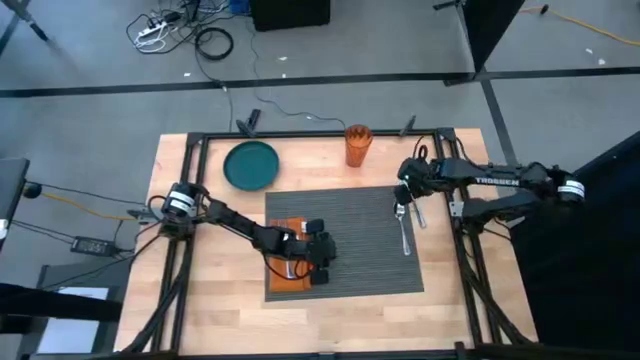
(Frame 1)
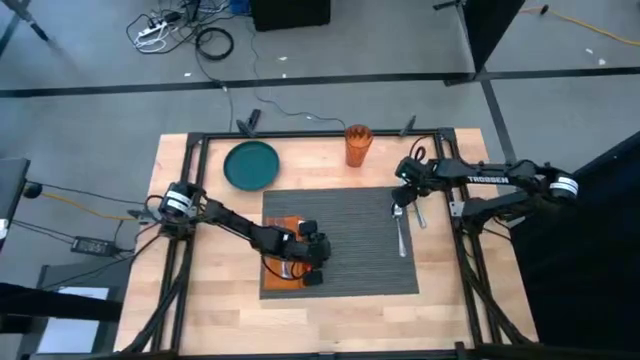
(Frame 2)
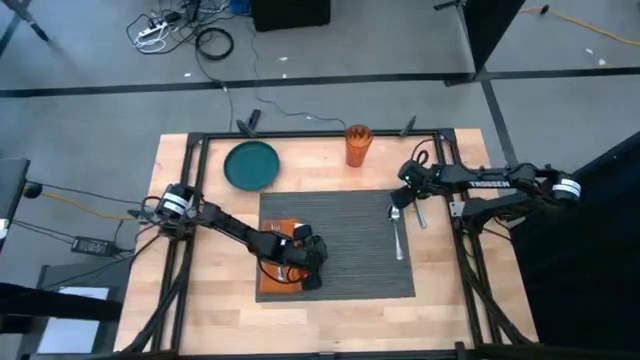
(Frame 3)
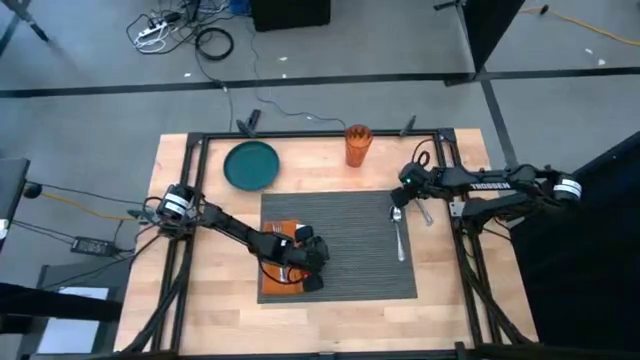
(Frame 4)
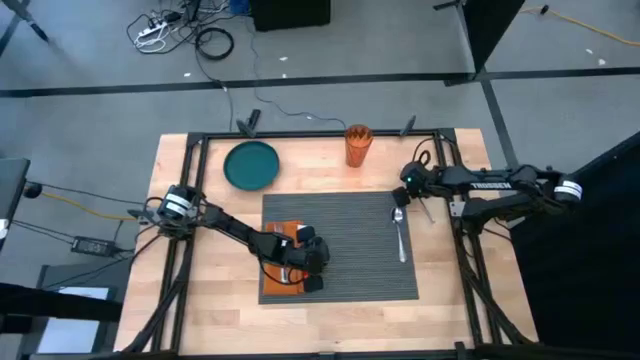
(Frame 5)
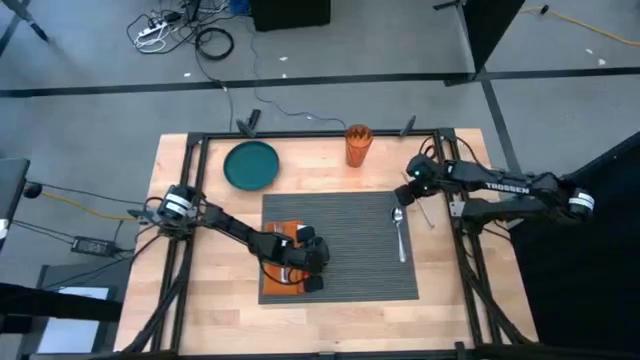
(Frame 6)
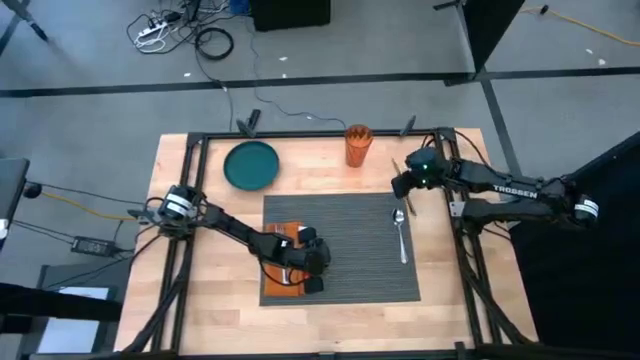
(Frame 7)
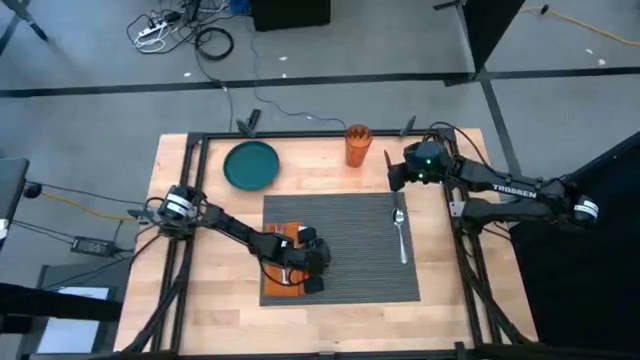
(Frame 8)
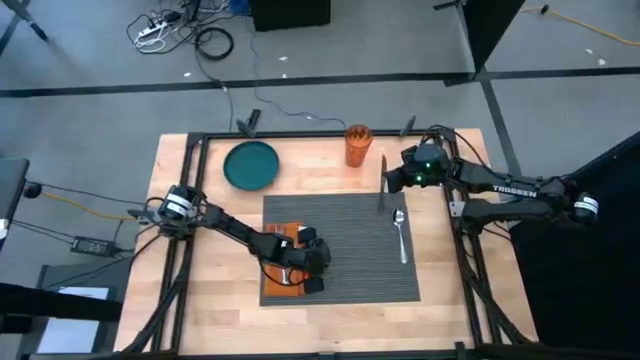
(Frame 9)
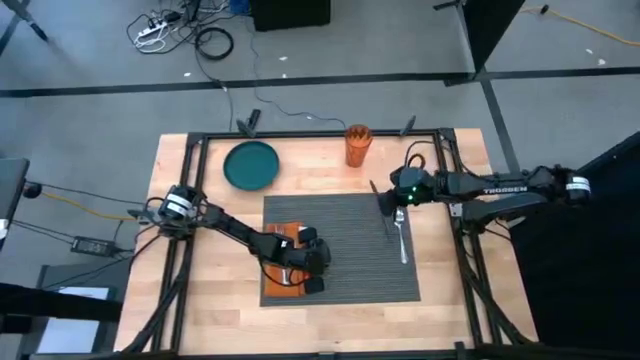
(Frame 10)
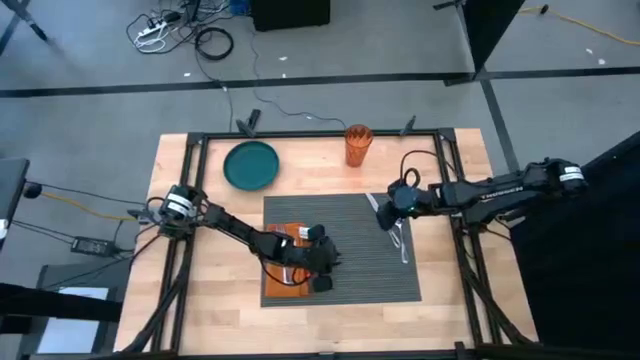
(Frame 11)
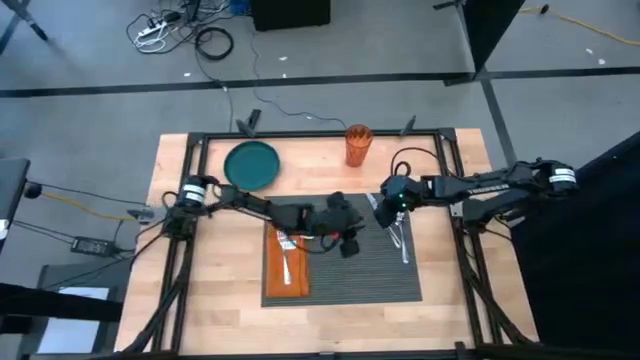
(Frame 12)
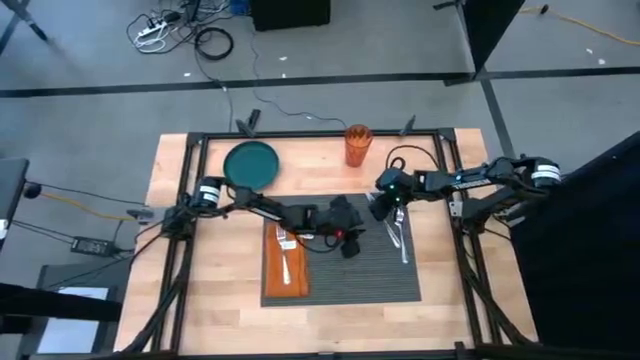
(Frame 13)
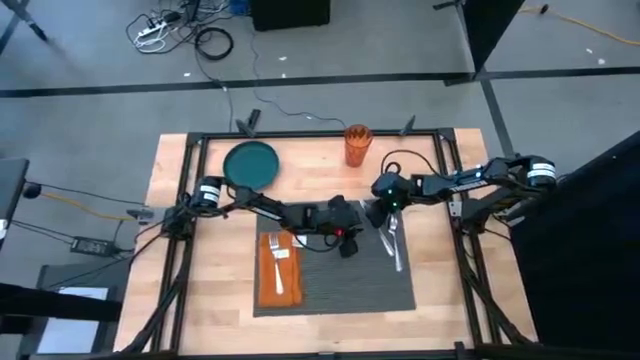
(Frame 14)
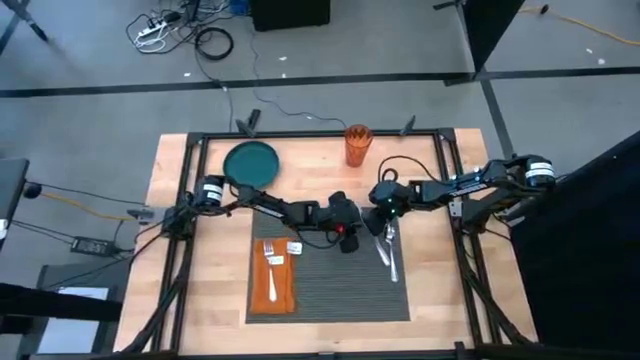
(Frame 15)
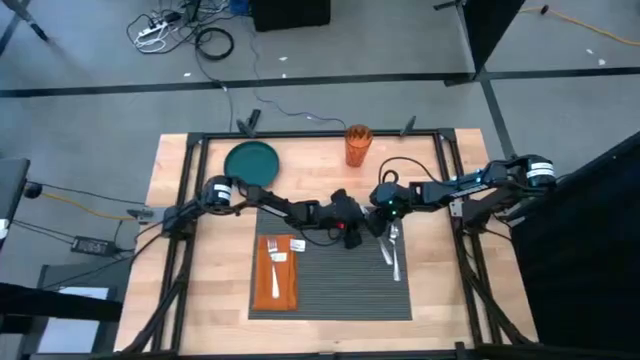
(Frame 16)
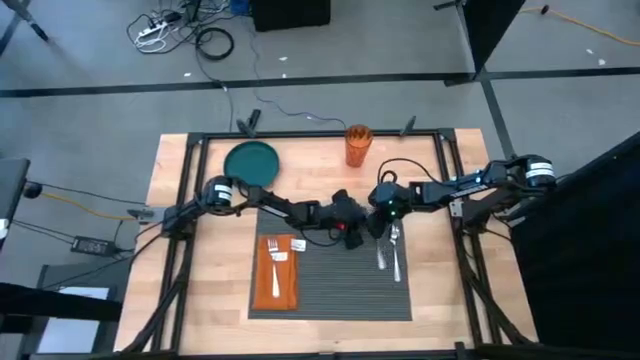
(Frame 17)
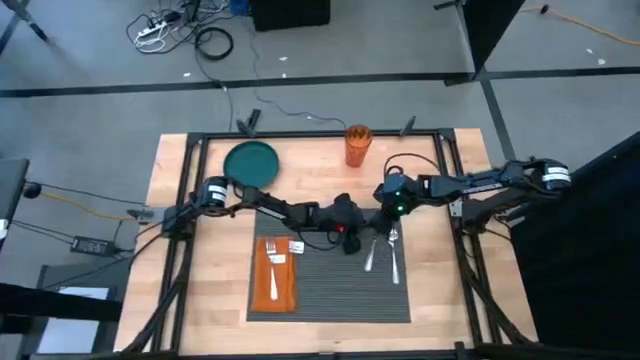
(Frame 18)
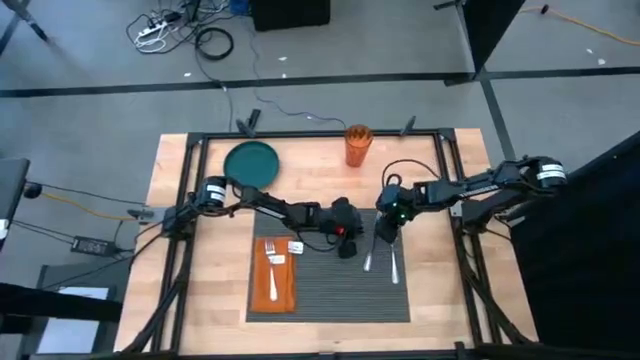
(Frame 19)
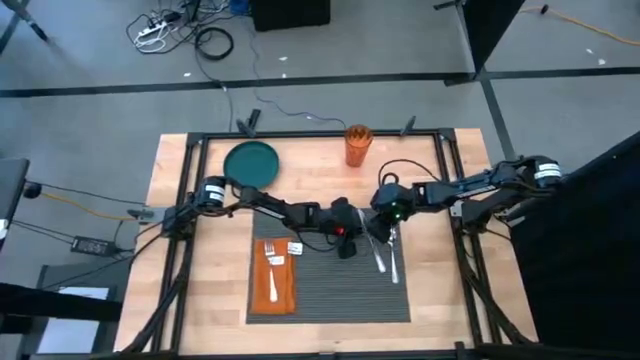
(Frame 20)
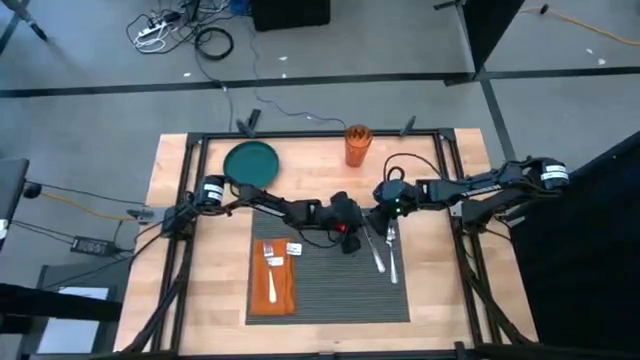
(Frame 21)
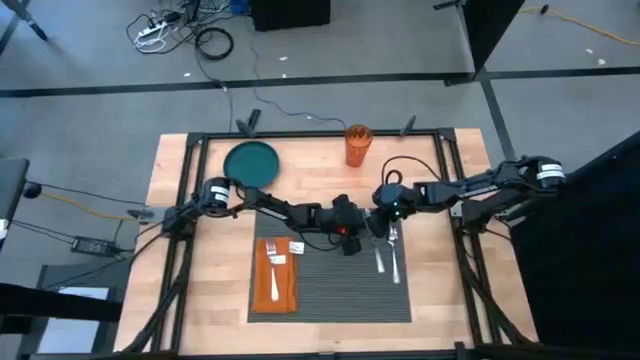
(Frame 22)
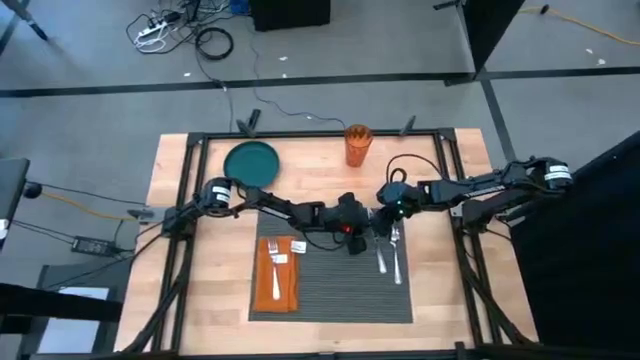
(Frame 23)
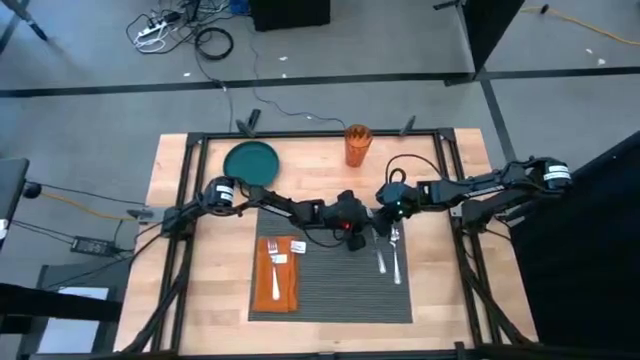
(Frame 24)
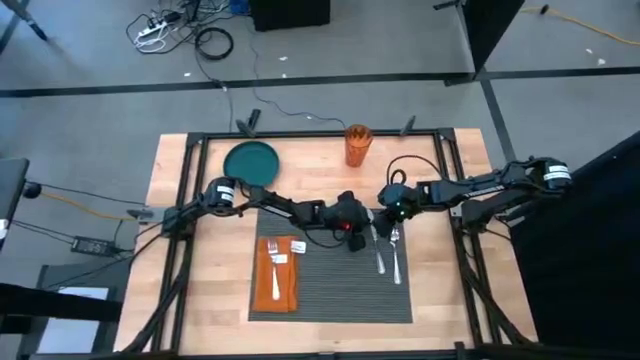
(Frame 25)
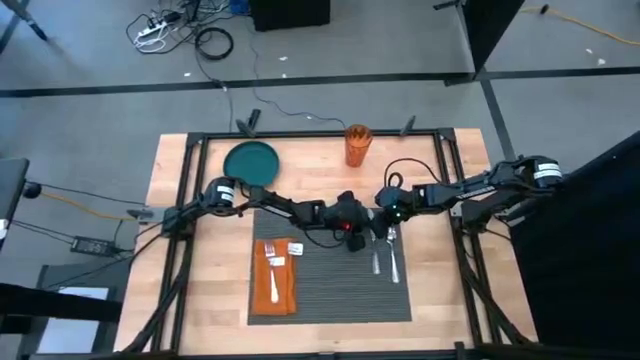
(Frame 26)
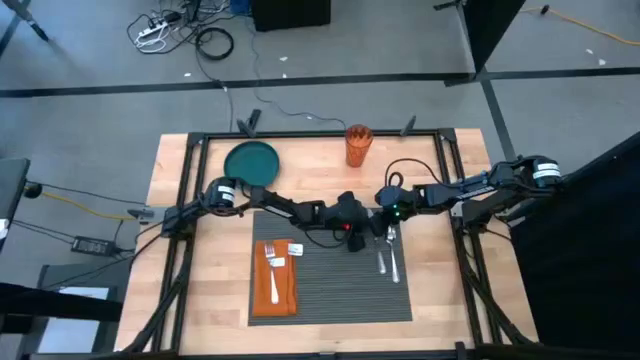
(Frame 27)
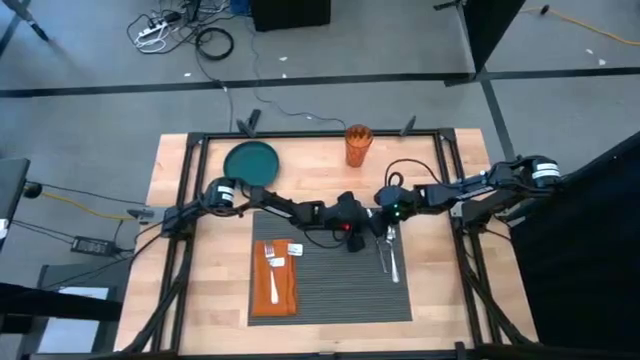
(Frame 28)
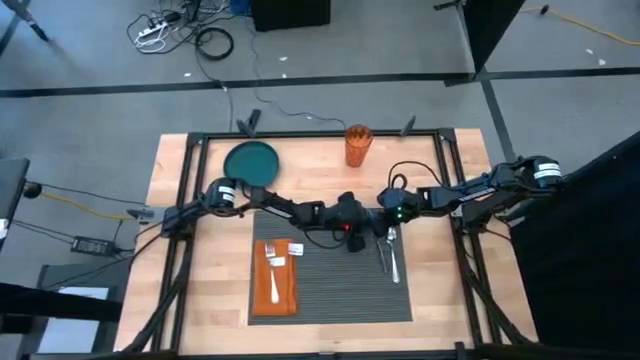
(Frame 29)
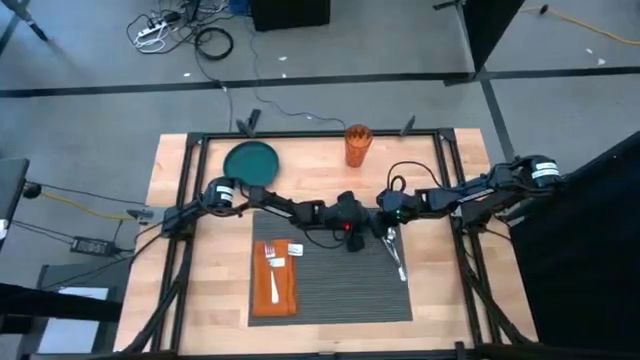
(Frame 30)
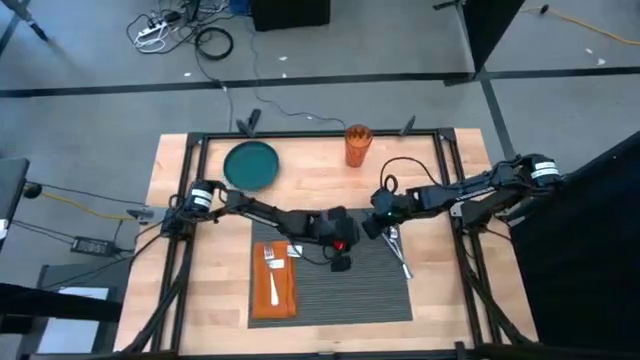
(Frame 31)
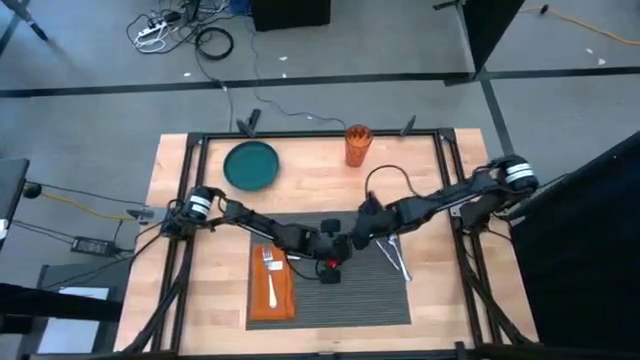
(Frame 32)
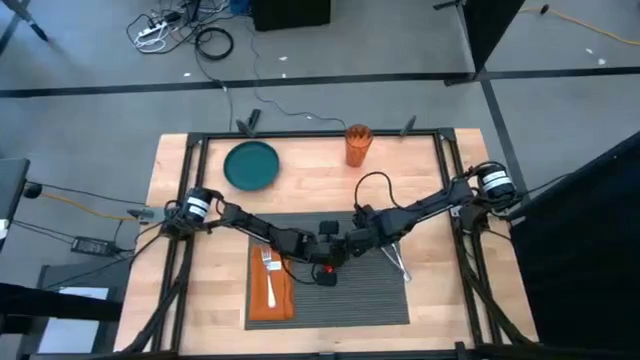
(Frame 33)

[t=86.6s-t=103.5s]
Task: Set table place
Put the silver table knife to the left of the silver spoon on the black table placemat

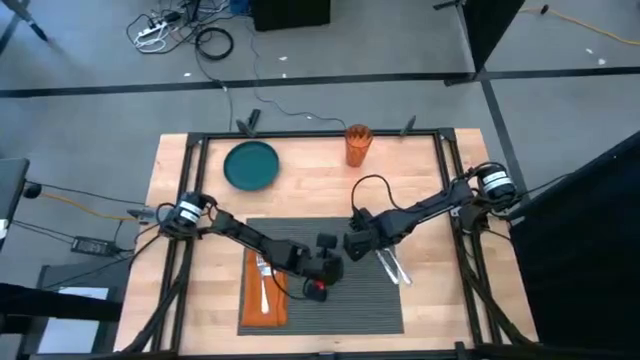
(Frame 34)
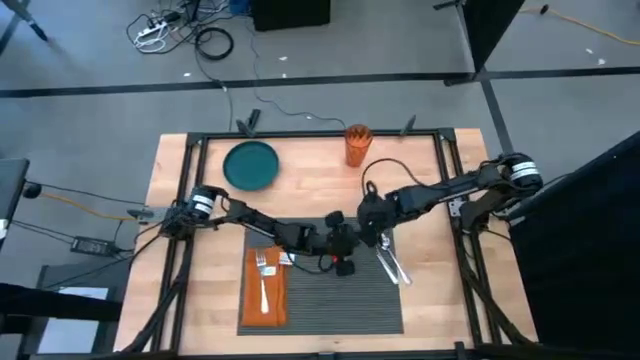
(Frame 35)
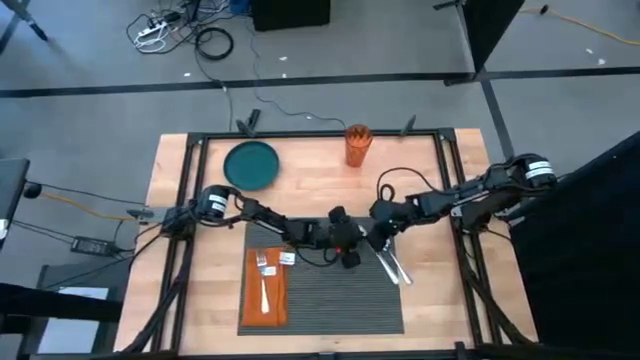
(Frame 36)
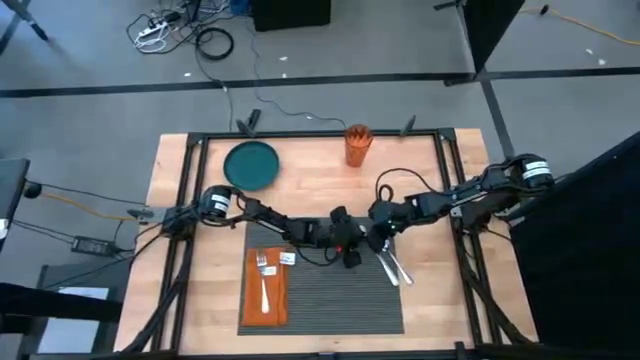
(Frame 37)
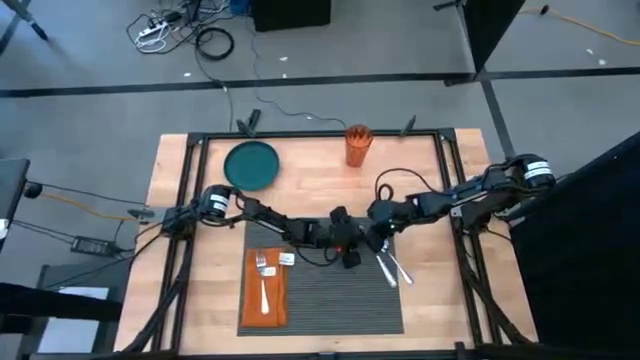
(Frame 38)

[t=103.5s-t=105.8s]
Put the silver table knife to the left of the silver spoon on the black table placemat

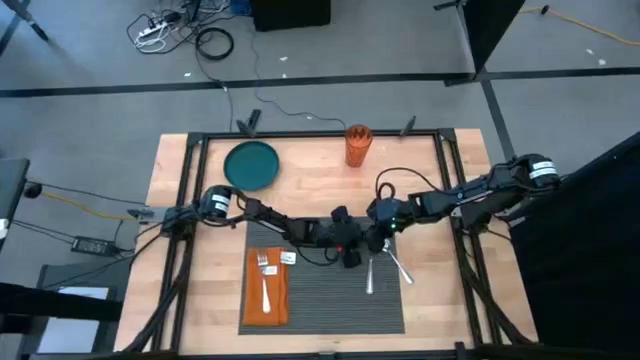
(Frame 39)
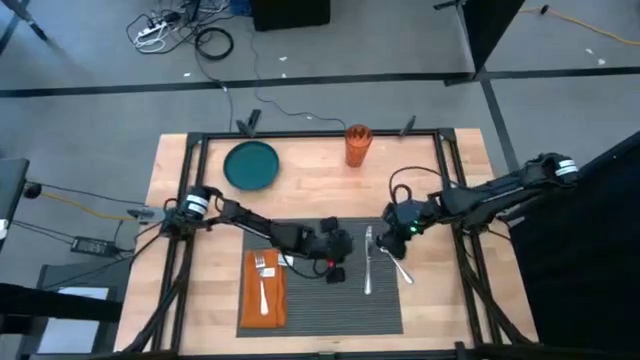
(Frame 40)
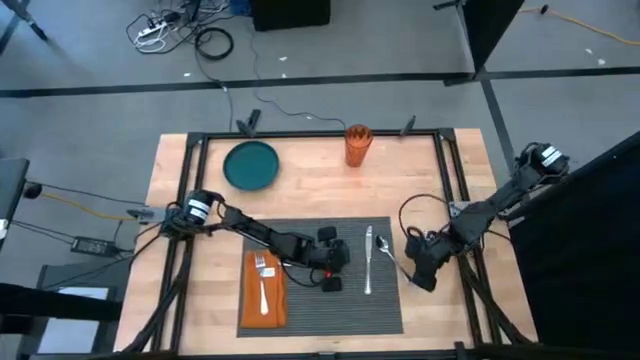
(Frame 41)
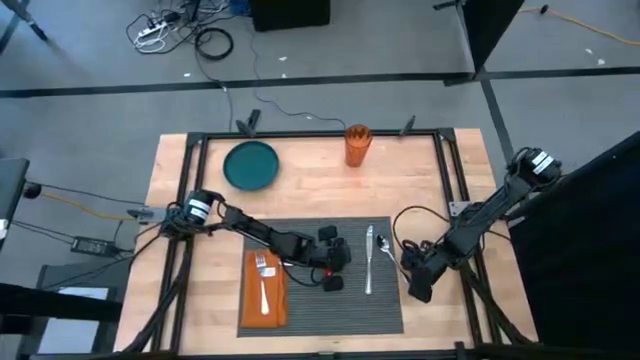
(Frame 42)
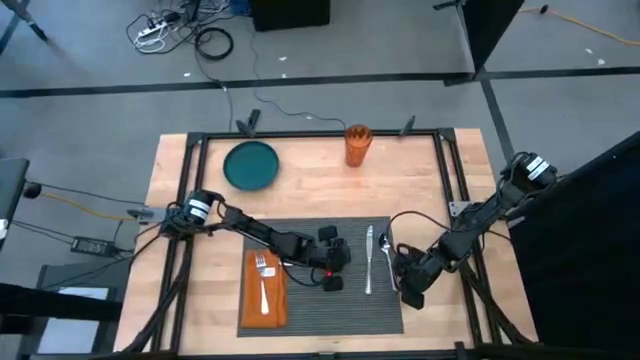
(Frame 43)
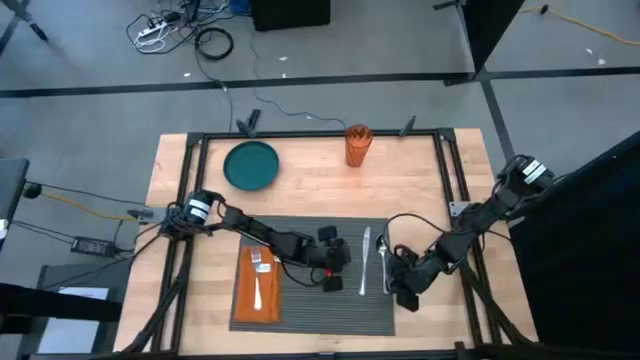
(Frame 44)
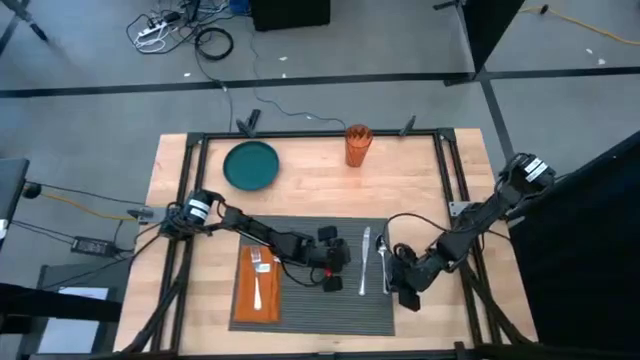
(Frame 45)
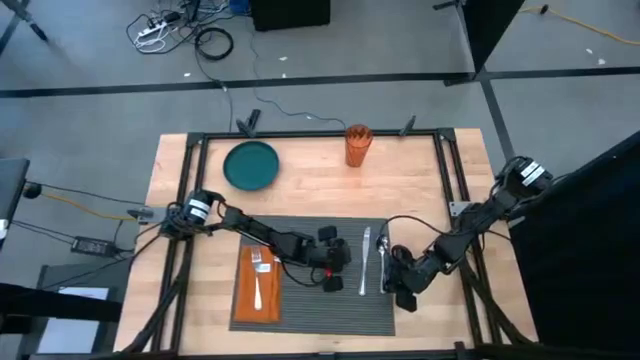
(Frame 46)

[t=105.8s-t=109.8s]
Adjust the silver spoon on the black table placemat
